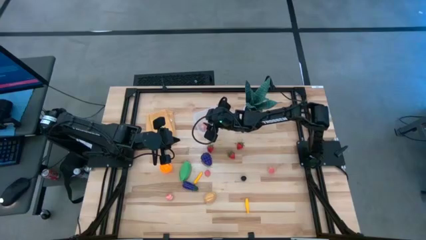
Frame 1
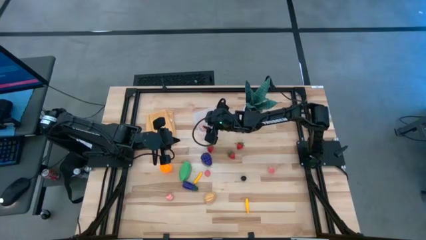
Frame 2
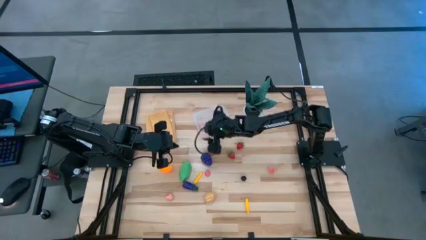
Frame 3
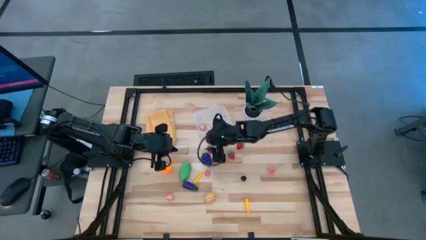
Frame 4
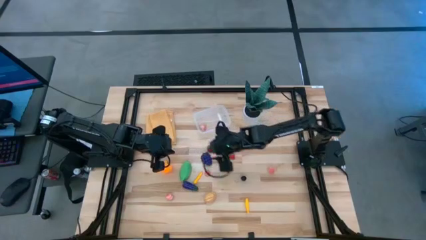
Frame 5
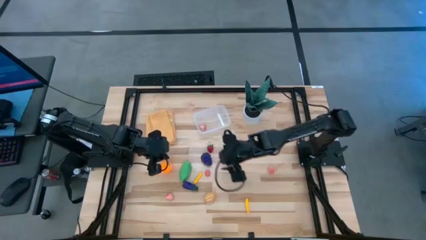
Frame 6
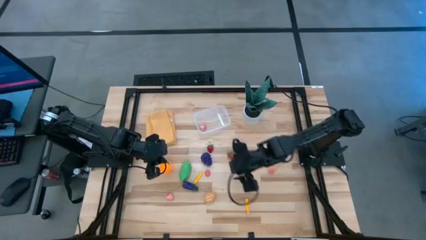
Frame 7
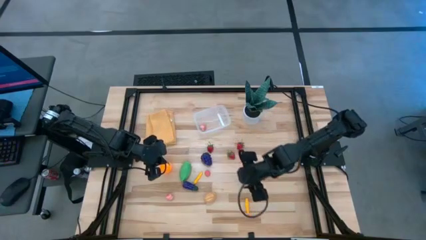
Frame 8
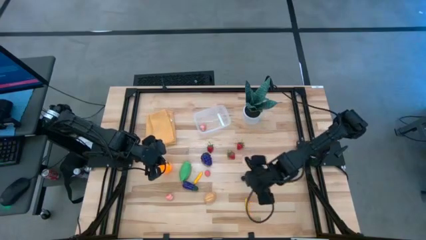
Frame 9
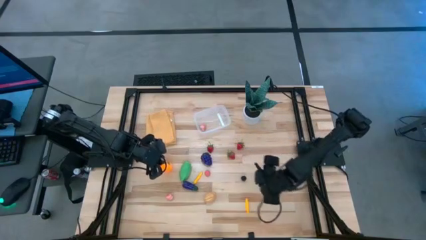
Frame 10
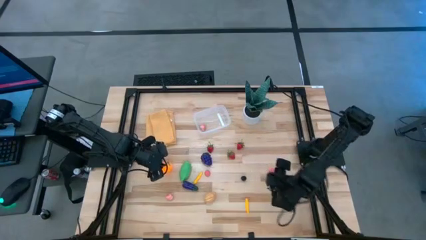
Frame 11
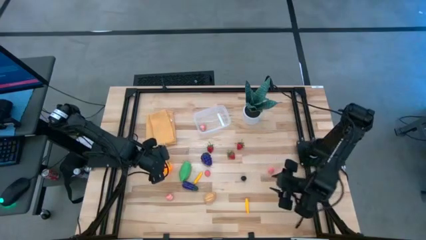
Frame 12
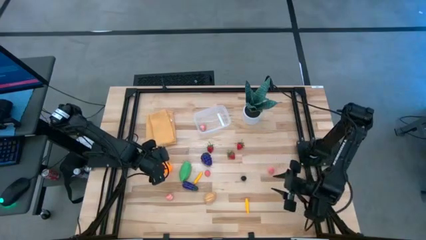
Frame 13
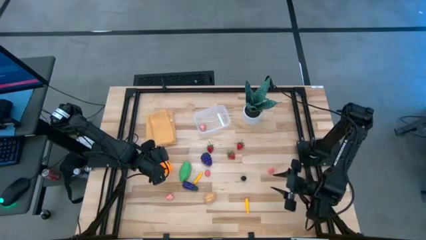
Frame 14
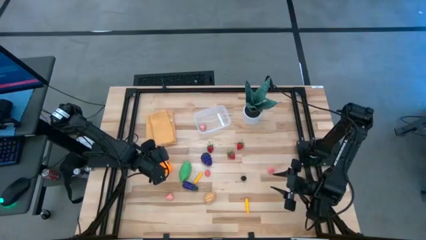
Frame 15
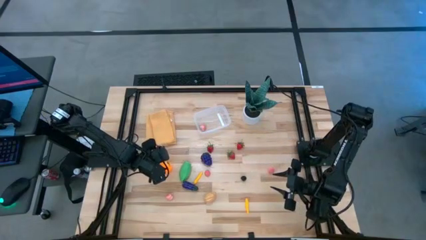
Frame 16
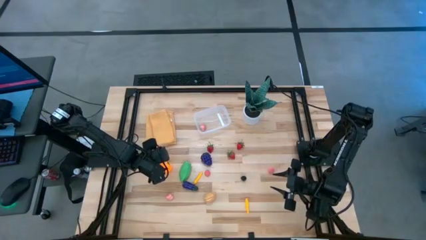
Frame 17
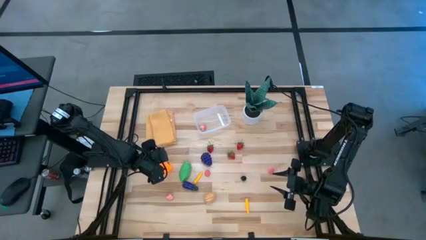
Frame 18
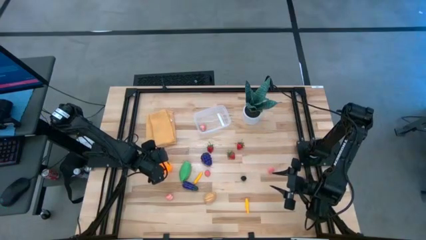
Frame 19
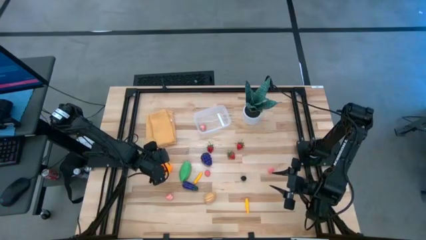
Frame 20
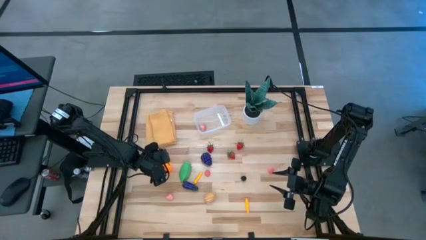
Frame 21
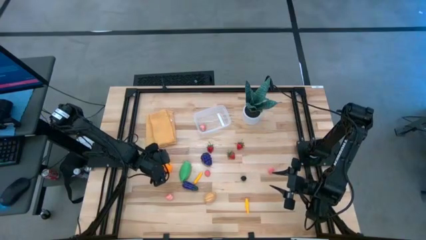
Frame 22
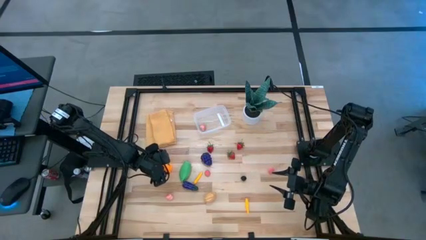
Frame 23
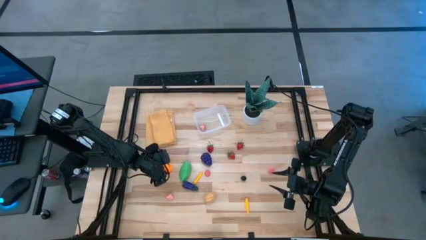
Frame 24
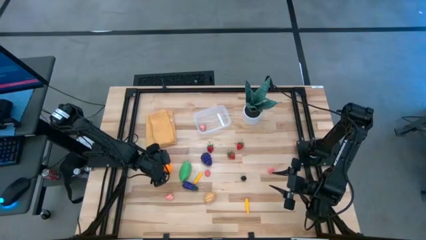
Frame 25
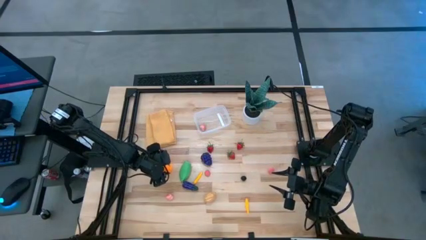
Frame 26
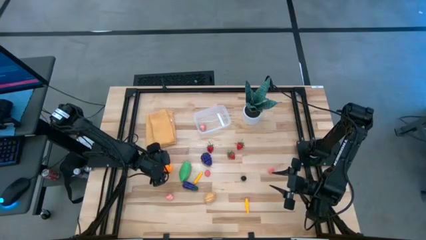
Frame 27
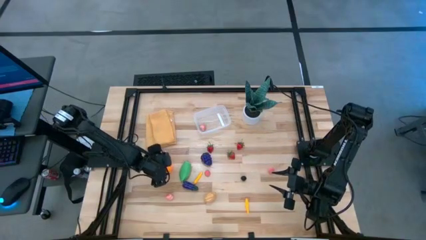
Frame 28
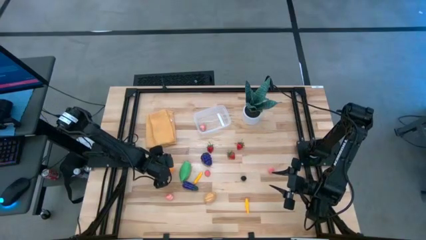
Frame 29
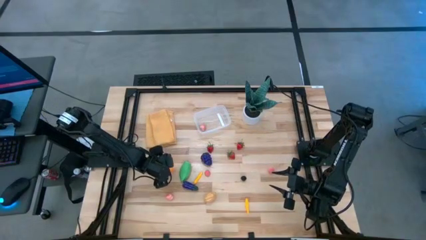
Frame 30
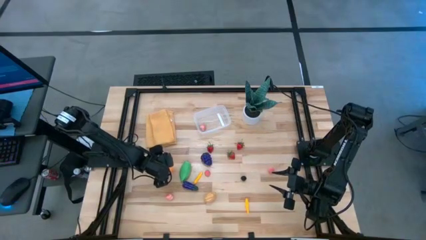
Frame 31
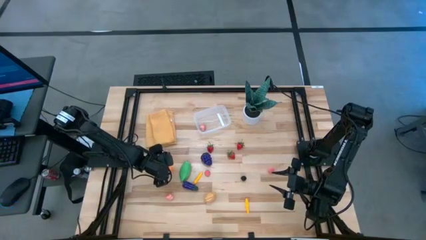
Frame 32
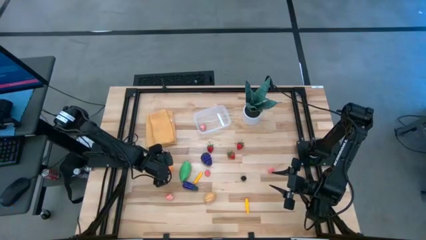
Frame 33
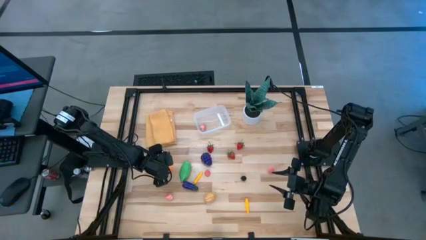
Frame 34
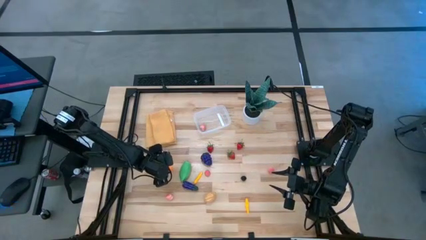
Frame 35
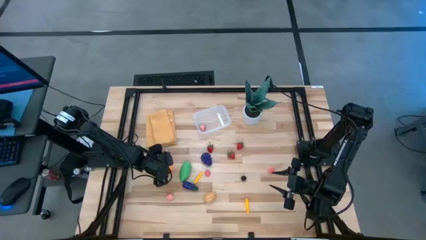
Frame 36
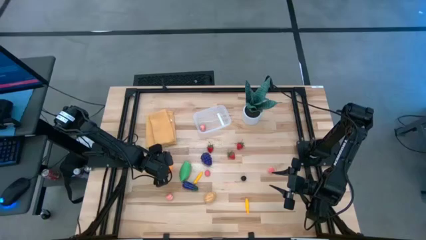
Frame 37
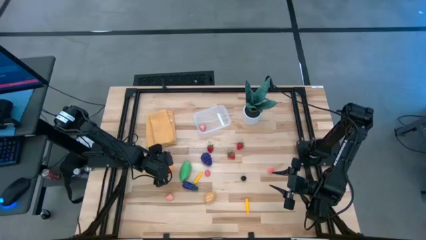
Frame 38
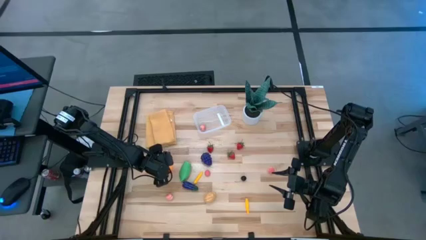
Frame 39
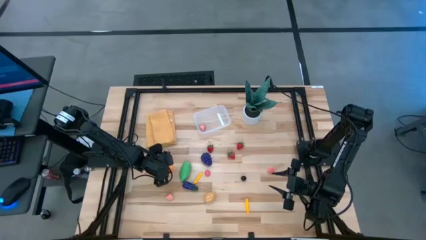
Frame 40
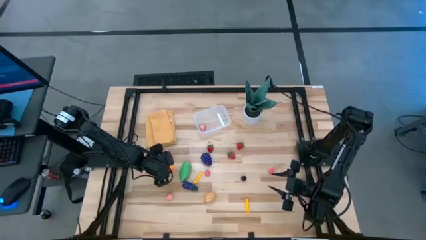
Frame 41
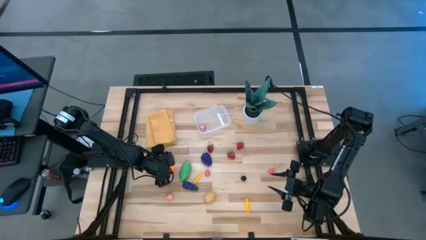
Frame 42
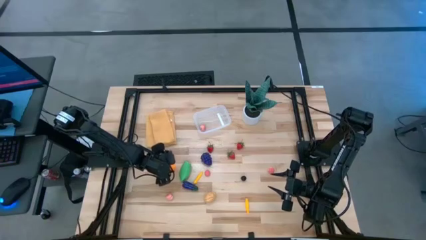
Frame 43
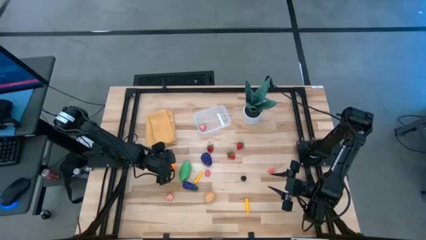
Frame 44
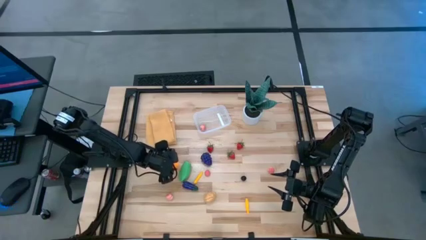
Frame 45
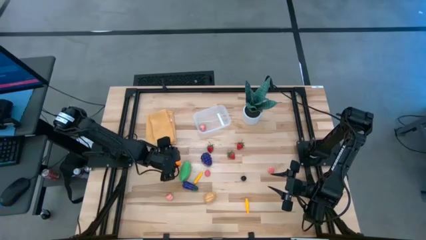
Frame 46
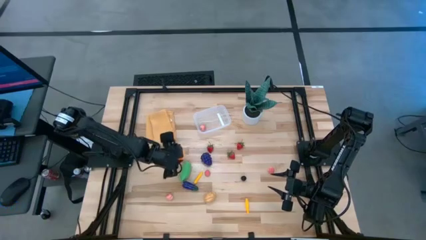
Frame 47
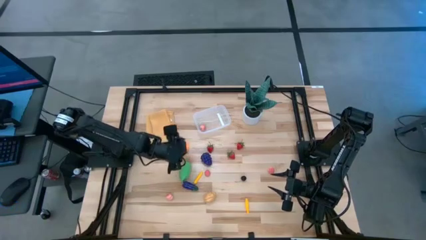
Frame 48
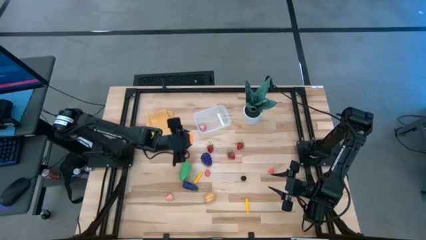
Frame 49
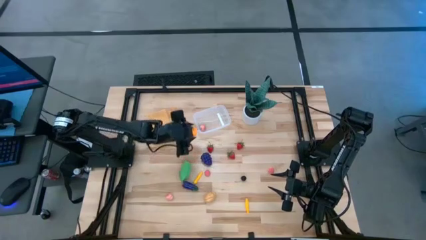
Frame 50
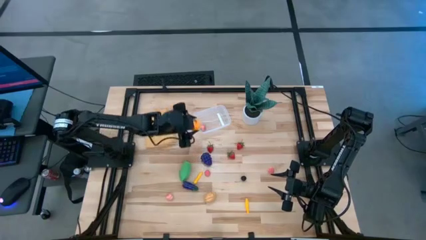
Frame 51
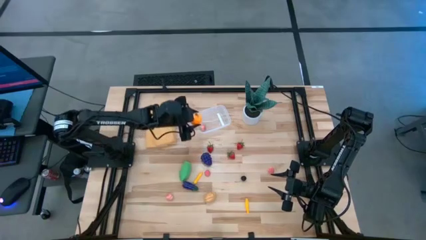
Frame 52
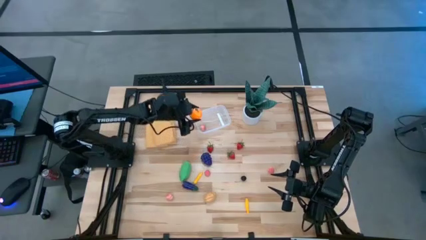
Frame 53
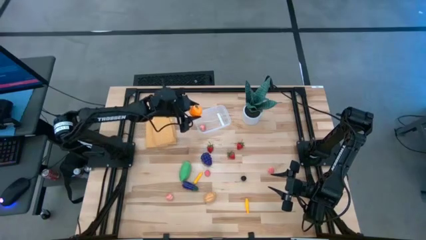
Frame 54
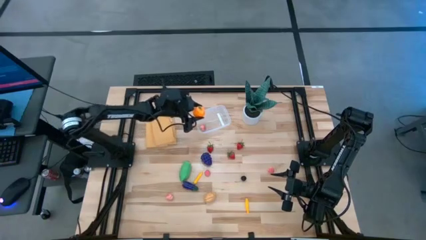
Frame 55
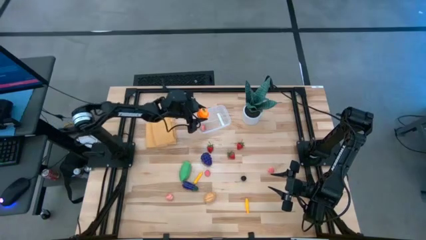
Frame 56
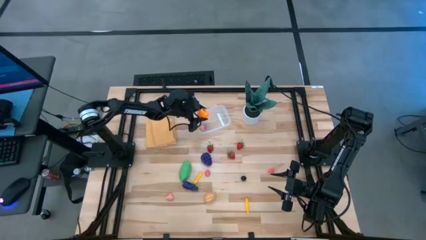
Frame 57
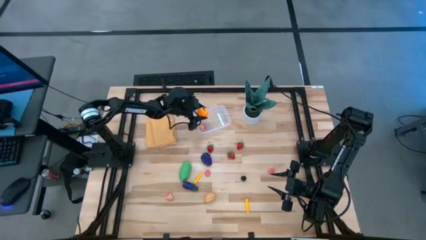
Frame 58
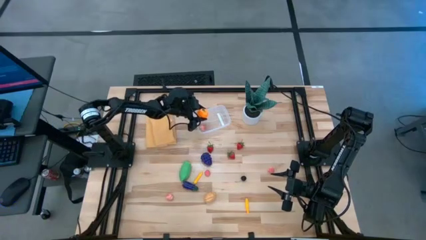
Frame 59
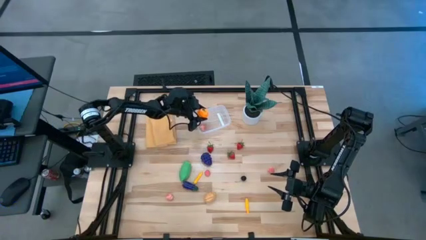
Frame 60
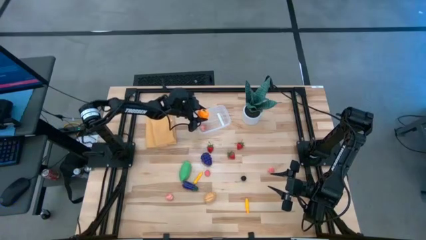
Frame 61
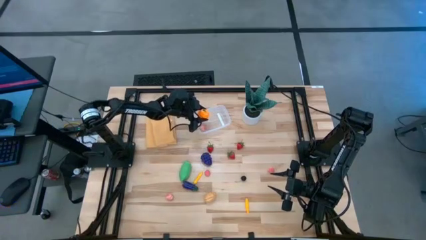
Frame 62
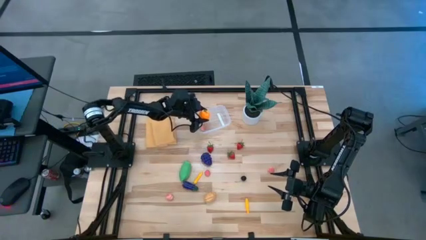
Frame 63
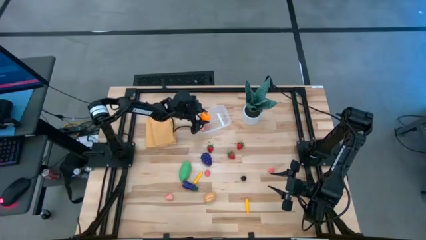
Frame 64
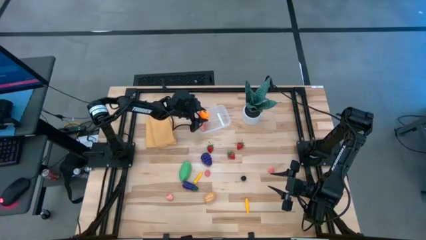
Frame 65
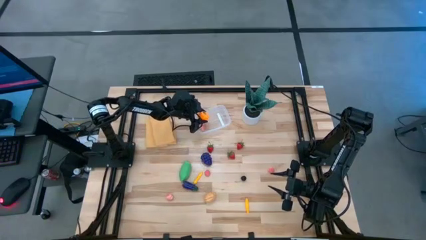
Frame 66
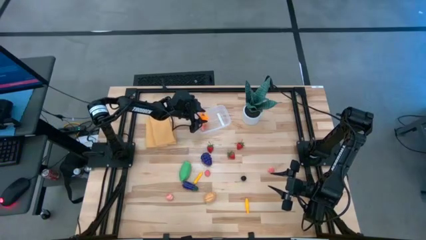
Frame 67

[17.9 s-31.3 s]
Task: Pick and placing Produce into tupperware
Put the orange into the transparent bin

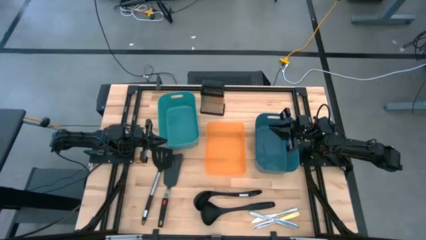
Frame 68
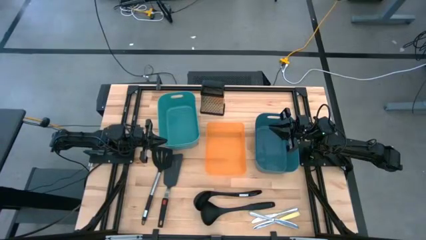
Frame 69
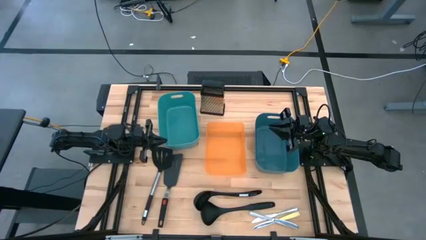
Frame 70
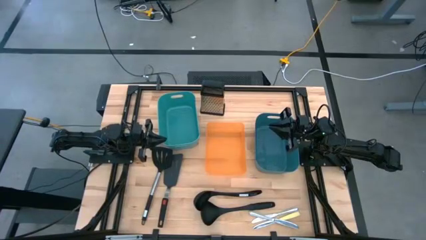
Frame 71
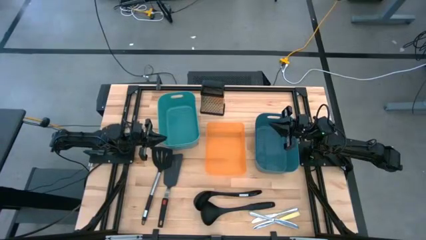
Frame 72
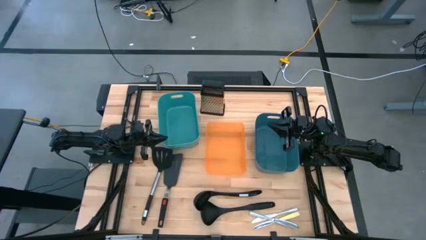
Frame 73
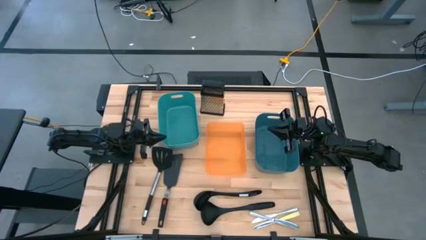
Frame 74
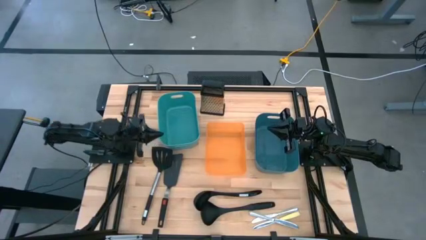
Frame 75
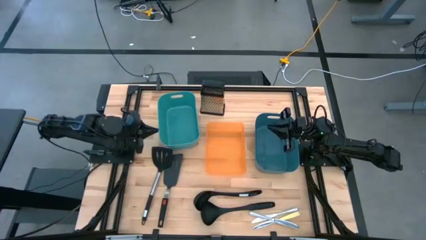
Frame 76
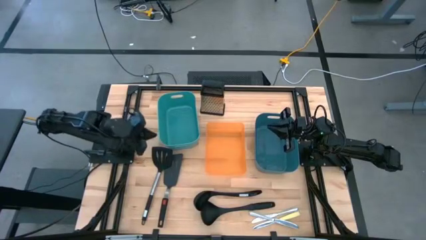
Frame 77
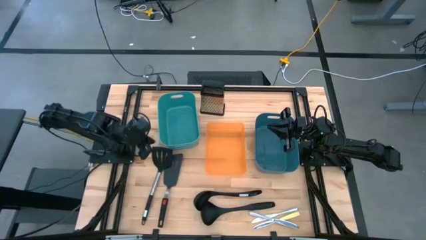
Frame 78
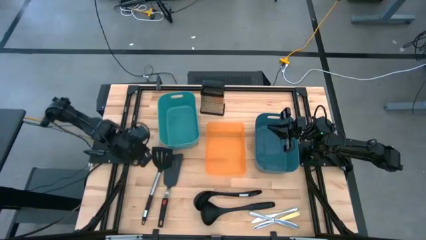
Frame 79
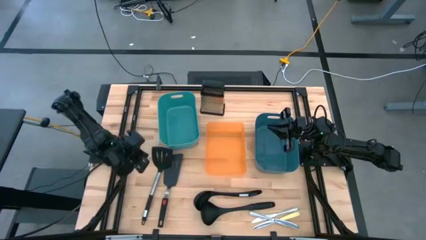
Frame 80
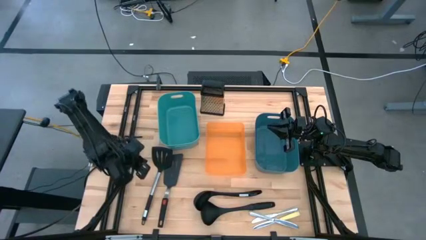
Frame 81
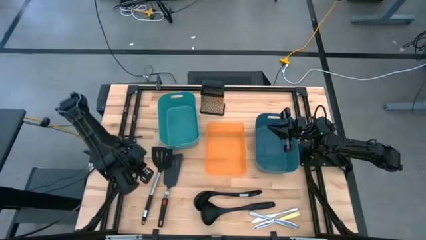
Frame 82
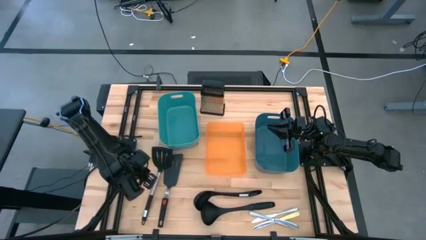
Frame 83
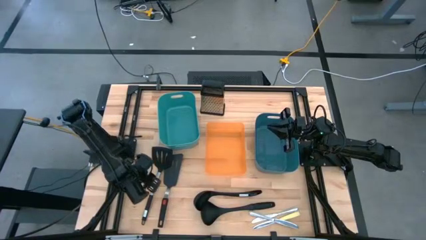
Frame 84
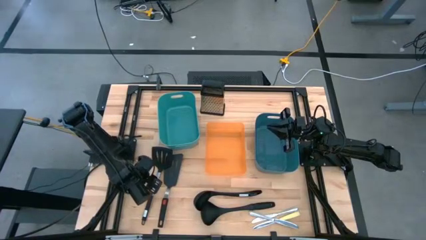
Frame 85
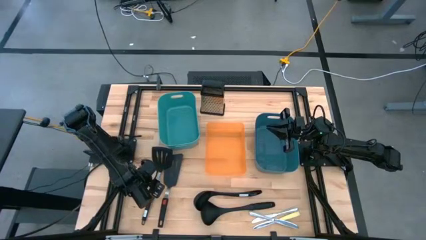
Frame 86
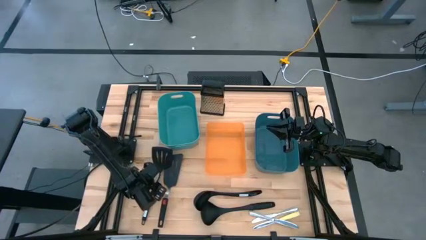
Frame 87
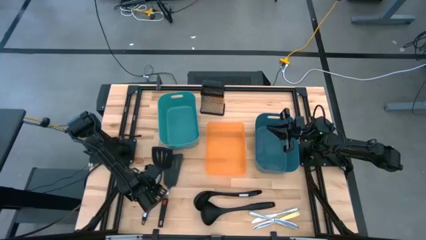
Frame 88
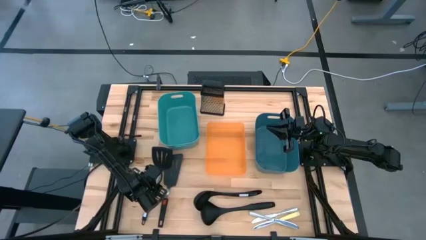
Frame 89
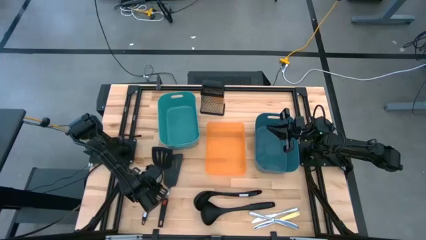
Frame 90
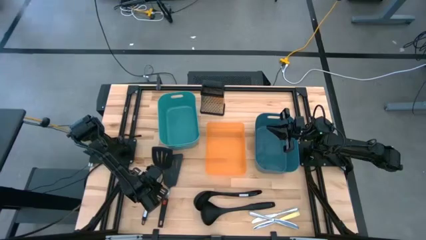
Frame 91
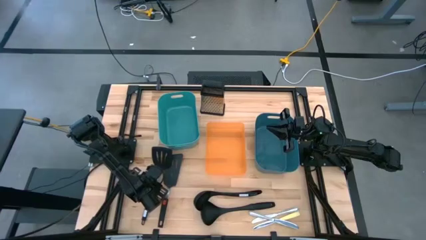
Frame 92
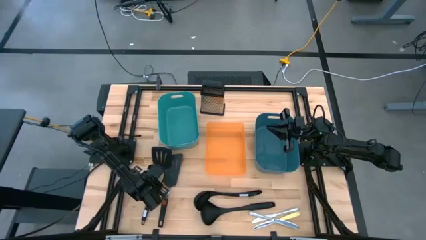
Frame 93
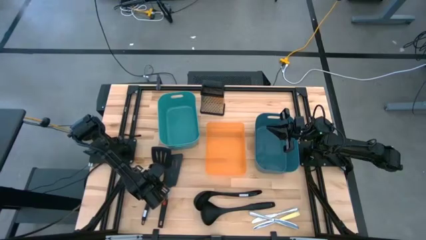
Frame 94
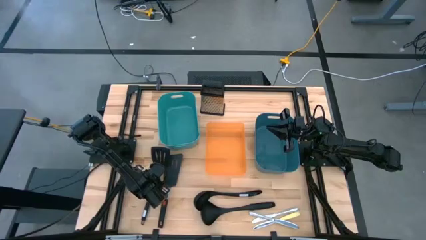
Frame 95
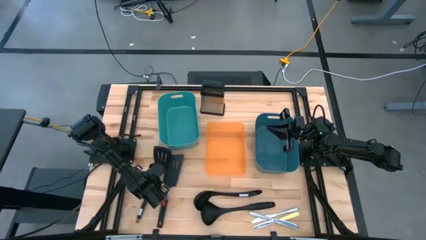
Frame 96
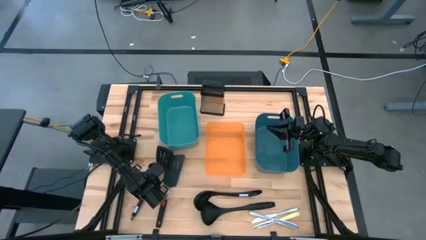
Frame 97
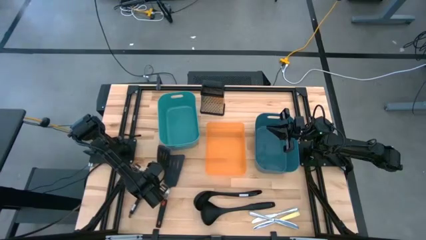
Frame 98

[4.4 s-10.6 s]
Task: Pick & Place Kitchen Items
Put the black spatula into the green bin
